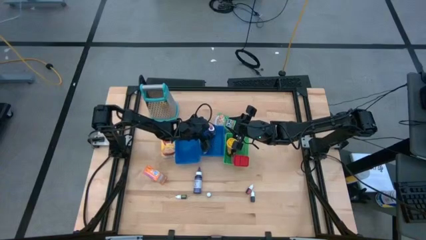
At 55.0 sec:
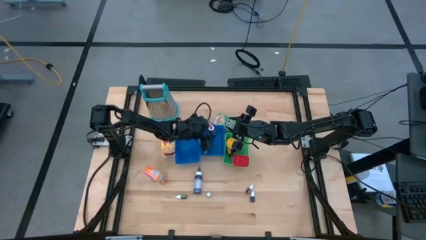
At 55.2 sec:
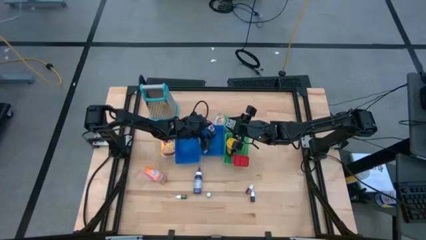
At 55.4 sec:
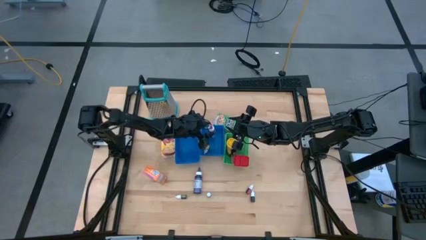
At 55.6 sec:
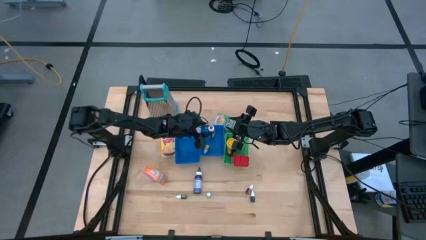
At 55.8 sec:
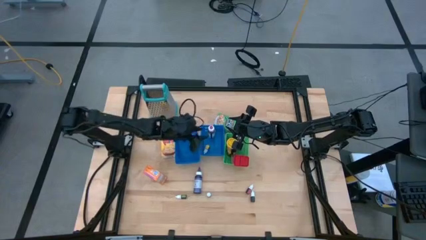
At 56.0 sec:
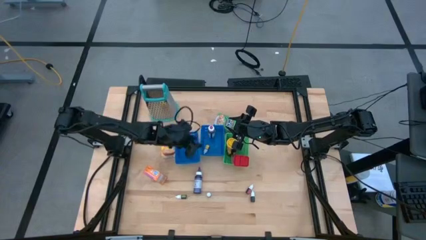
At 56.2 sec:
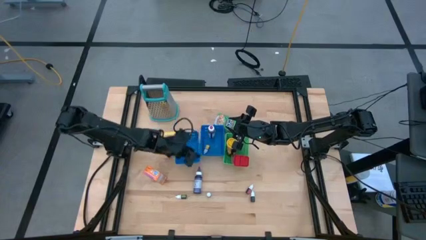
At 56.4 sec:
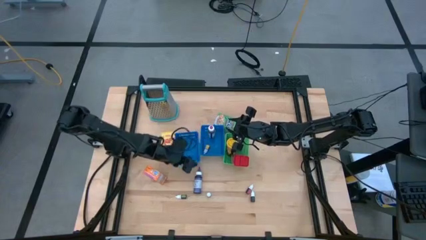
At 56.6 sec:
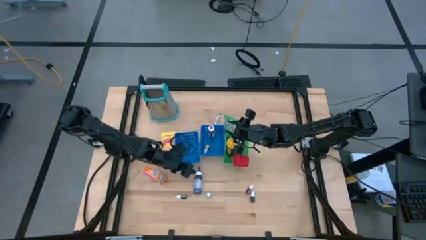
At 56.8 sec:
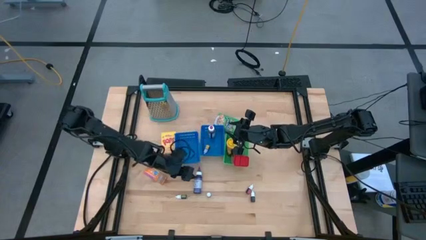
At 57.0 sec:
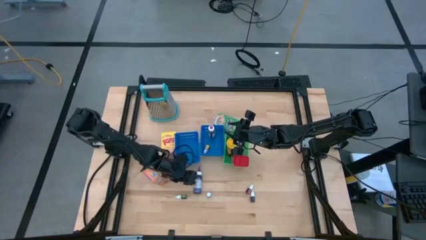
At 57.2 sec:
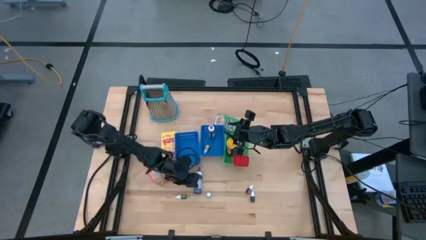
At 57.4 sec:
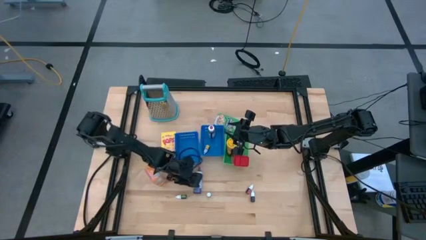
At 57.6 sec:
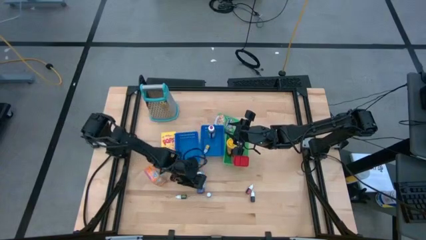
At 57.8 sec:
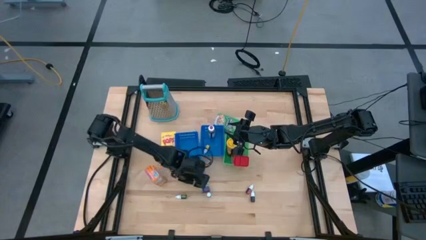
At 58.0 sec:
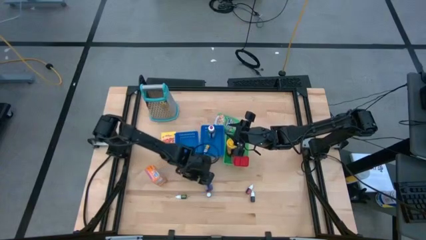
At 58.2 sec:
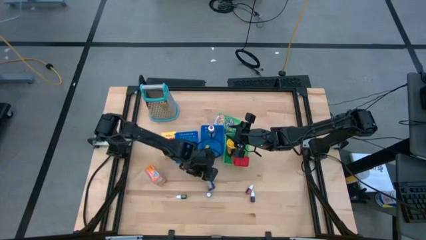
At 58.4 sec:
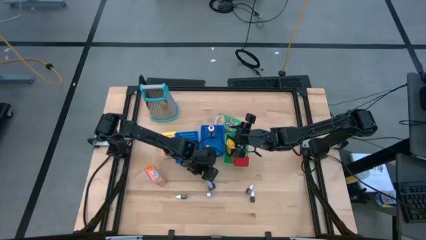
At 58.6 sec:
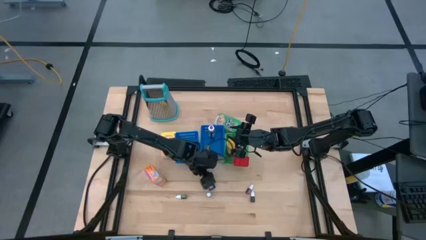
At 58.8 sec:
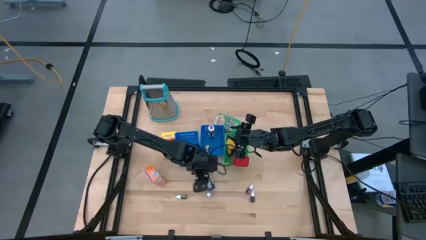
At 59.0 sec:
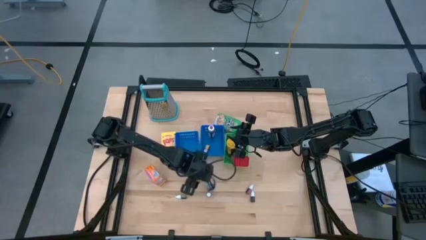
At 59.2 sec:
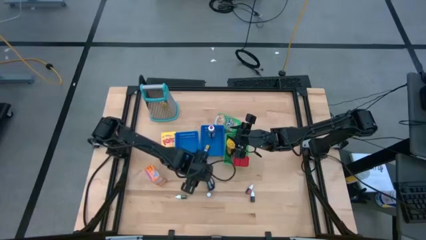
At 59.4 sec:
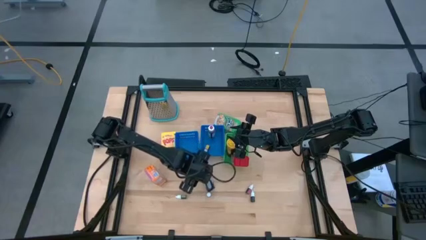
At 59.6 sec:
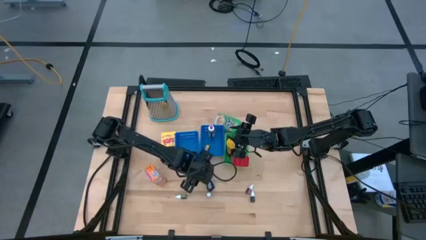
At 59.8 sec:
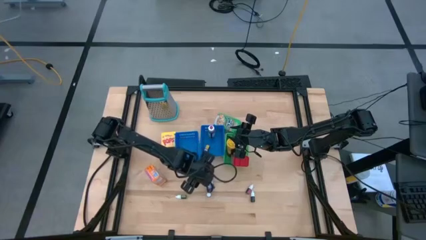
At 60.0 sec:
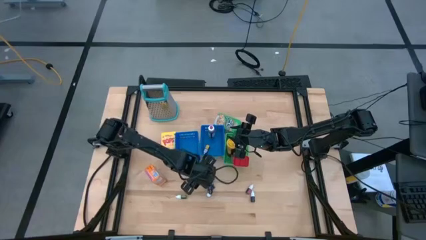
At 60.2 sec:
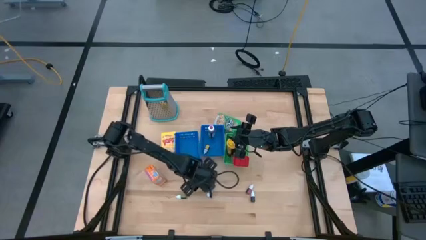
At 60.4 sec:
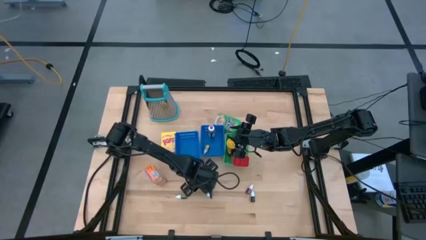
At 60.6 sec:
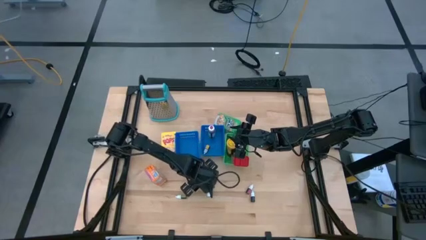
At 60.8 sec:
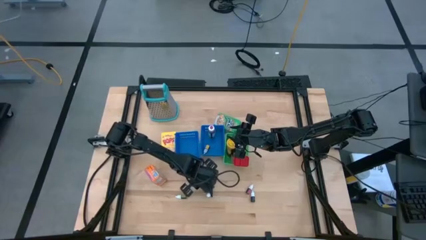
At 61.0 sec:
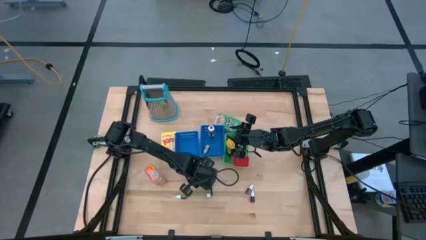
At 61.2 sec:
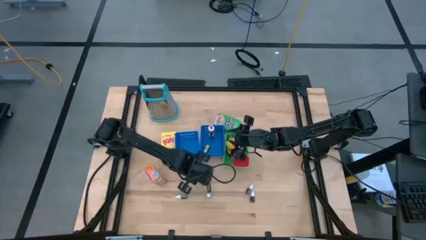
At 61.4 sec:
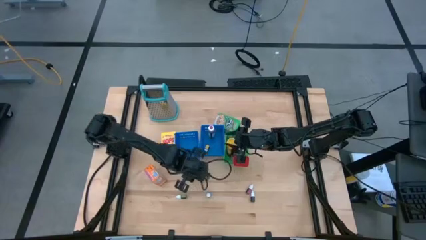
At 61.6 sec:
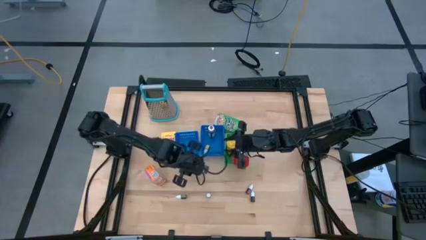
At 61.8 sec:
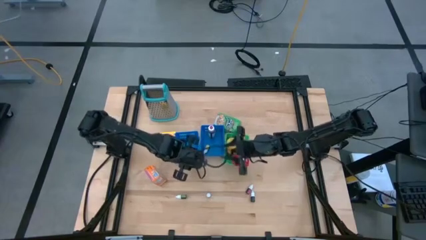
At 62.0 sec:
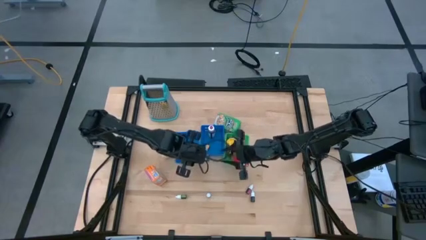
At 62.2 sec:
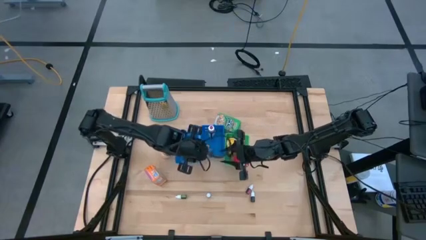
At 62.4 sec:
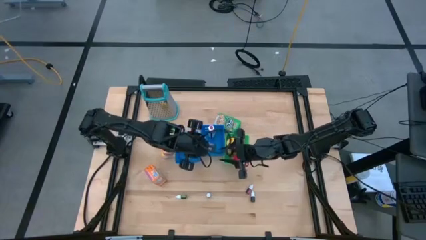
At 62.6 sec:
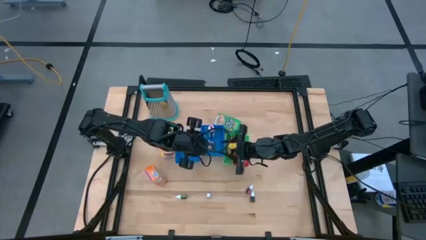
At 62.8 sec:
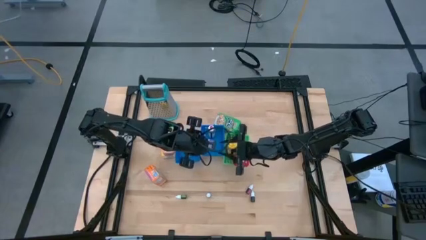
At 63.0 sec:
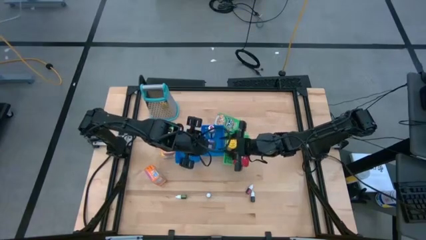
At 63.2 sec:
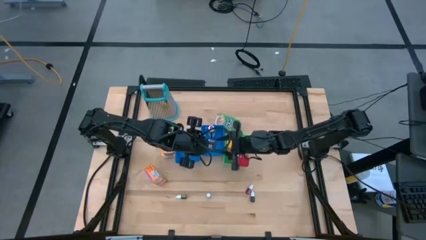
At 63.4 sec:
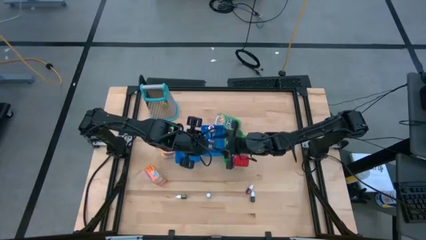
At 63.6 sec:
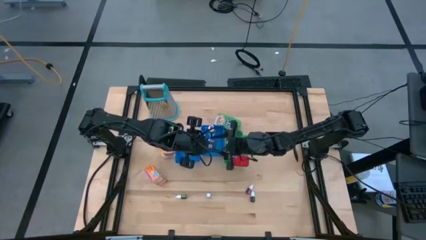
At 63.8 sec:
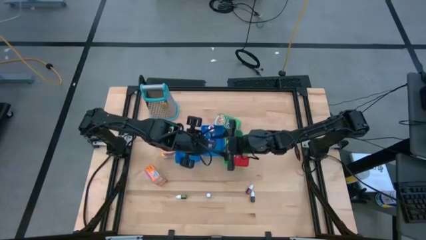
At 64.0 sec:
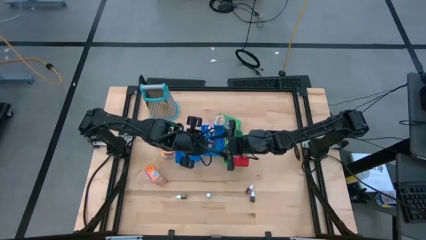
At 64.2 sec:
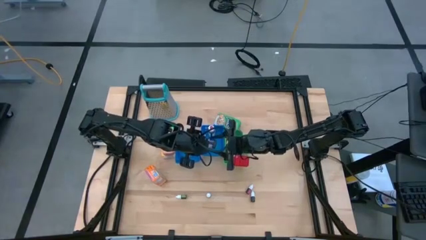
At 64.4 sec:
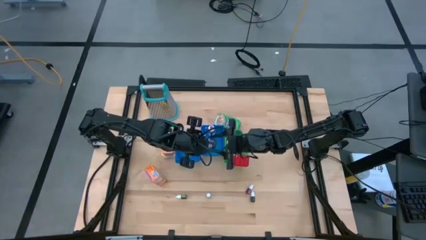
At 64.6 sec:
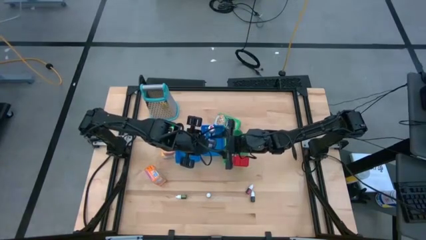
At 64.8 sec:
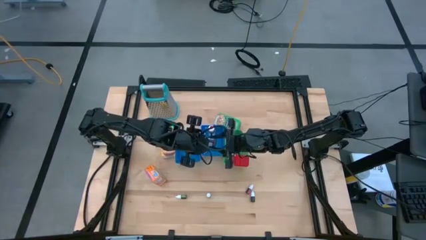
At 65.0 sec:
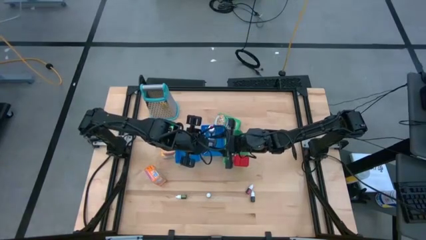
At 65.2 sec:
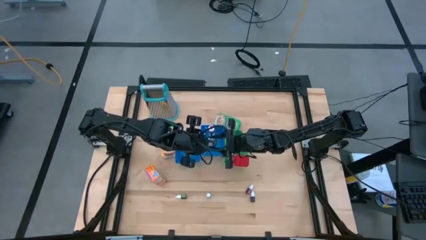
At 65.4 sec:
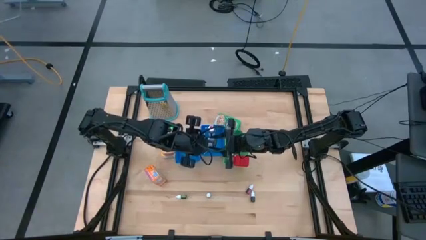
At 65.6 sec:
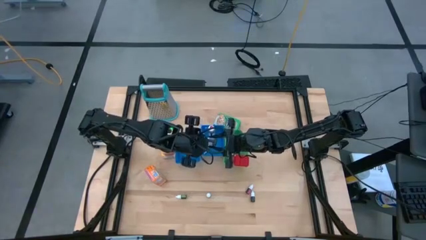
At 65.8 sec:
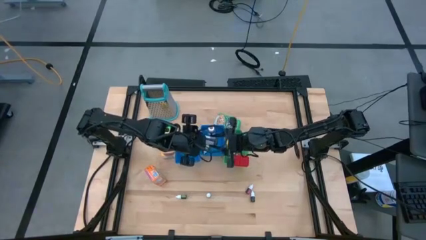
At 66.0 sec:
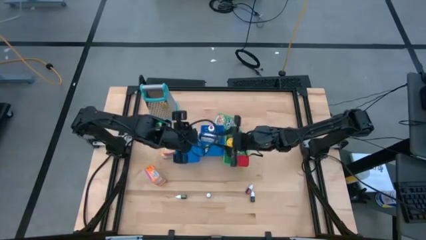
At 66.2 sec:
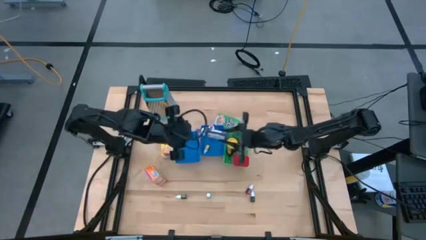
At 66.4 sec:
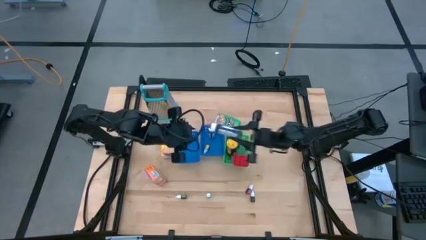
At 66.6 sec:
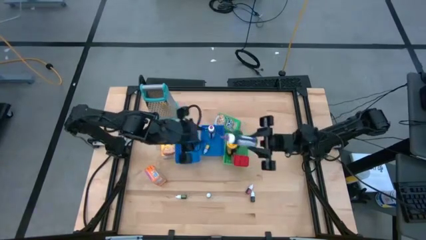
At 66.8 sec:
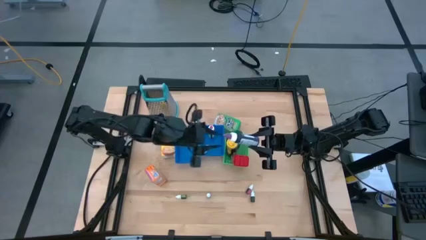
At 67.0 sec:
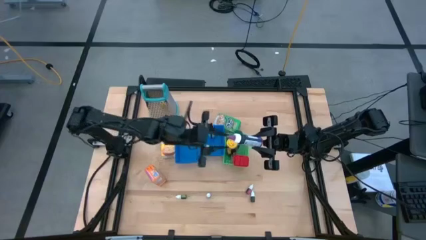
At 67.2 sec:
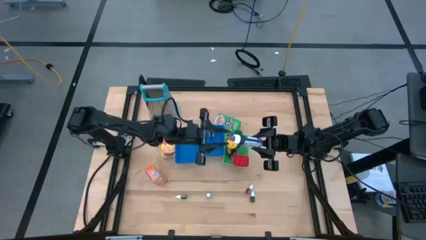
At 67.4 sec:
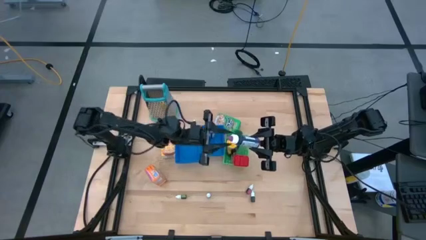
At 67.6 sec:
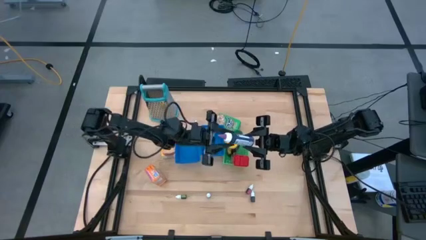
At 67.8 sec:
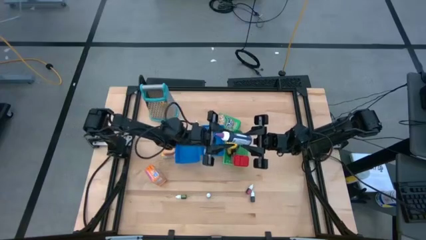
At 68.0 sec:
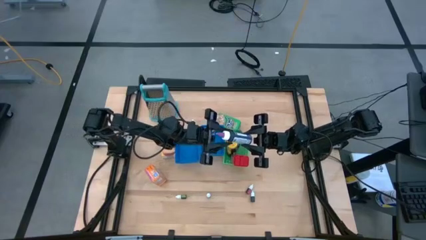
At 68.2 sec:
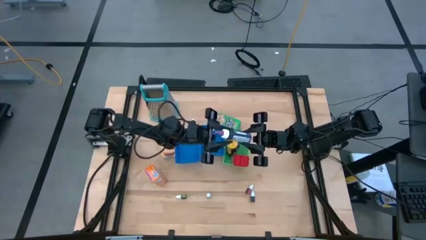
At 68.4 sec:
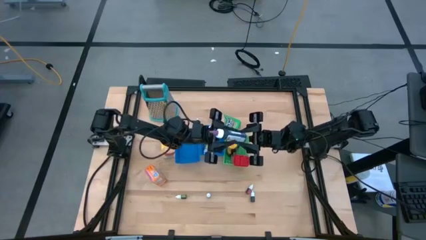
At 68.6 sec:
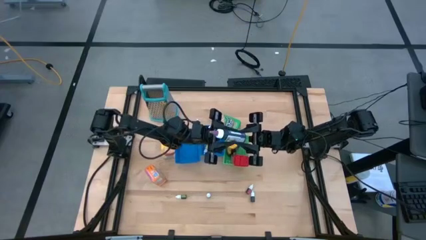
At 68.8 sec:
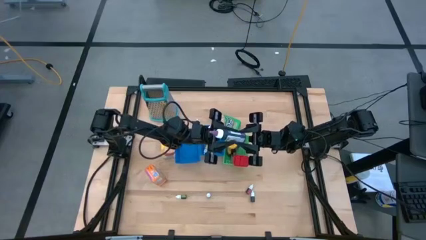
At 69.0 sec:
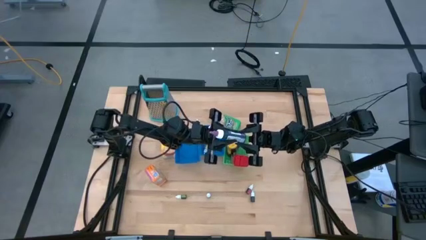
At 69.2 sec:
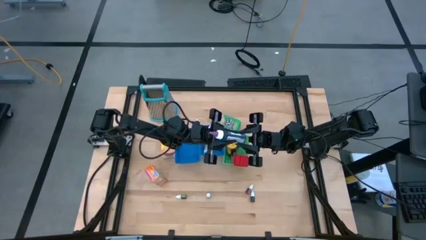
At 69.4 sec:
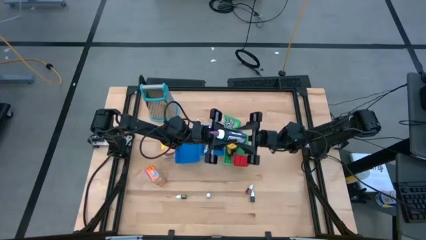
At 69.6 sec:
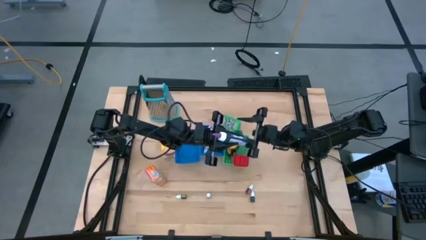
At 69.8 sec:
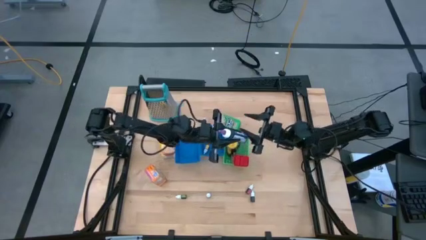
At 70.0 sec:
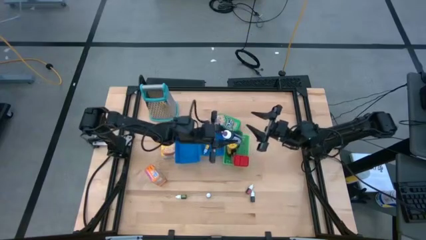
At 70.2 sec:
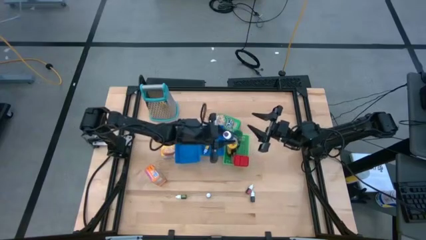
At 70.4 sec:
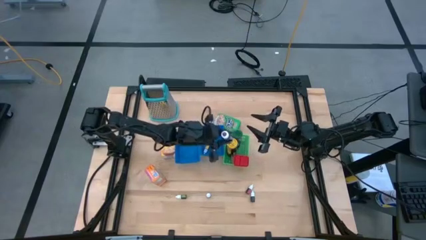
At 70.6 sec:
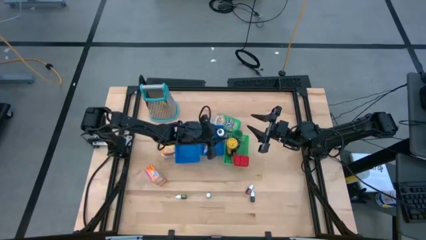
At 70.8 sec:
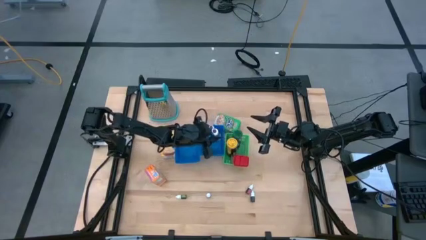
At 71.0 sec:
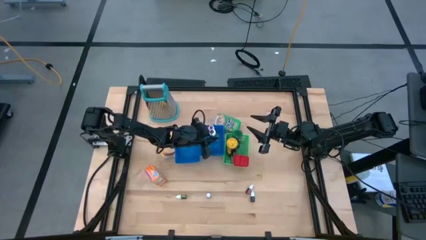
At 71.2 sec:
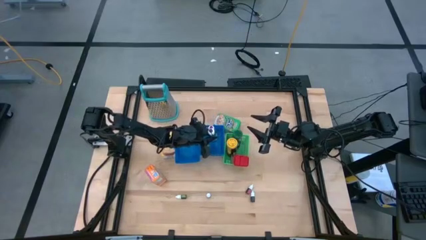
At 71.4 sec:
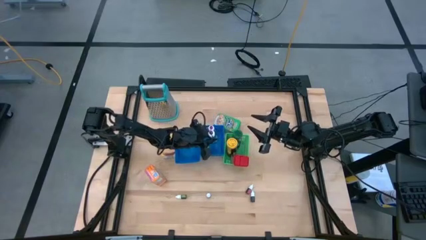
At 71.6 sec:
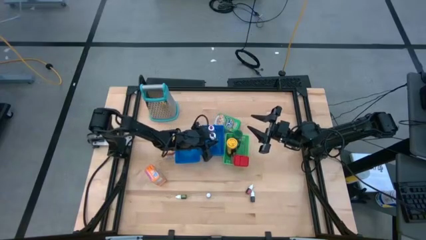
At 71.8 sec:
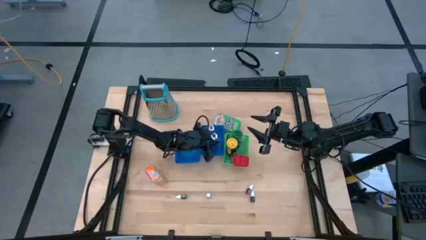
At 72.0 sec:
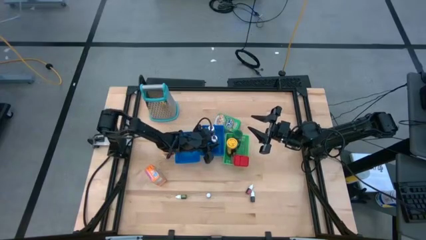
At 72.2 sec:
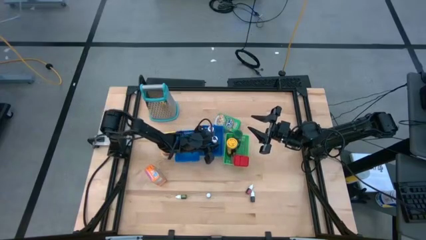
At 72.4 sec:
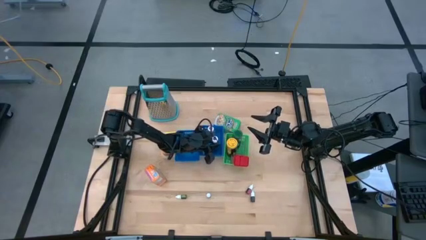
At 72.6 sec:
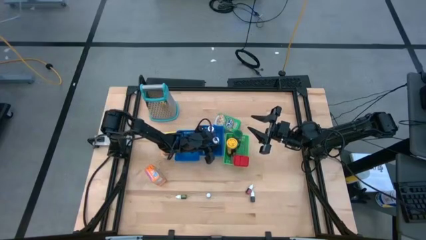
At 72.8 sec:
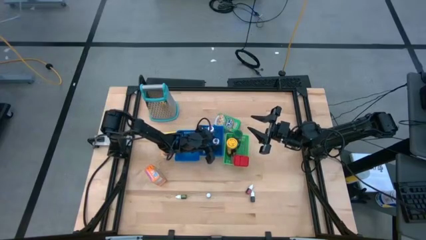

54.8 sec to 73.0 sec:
Task: Pick & Place Kitchen Items
Put the large violet food coloring bottle into the right blue bin
